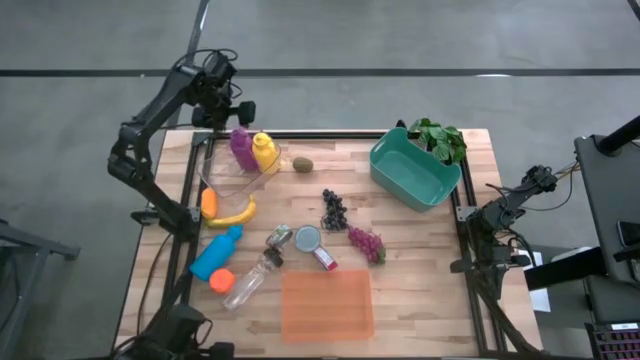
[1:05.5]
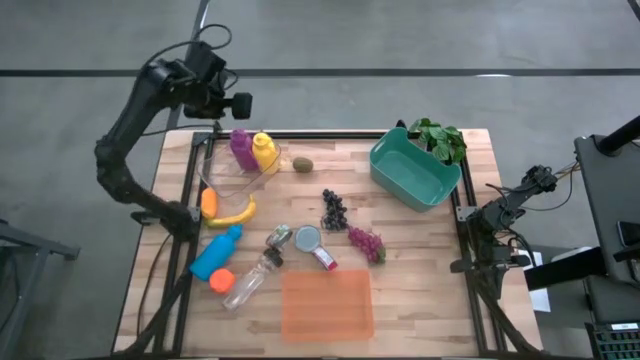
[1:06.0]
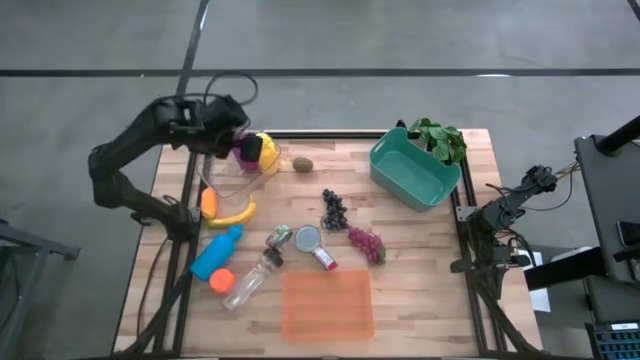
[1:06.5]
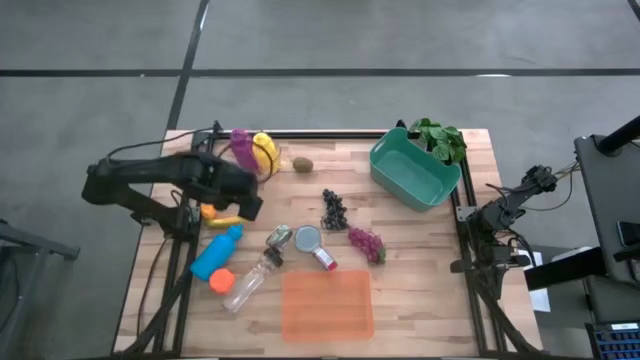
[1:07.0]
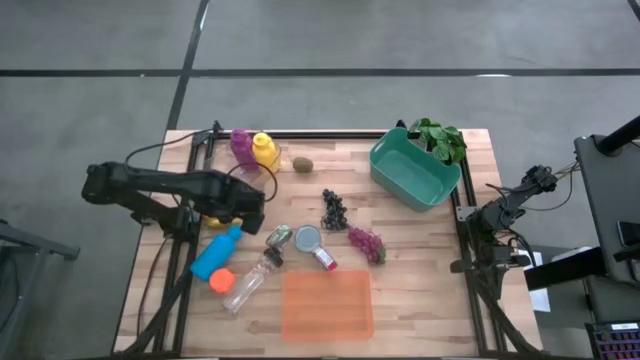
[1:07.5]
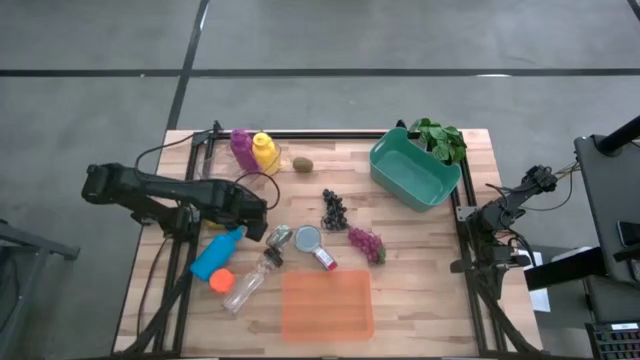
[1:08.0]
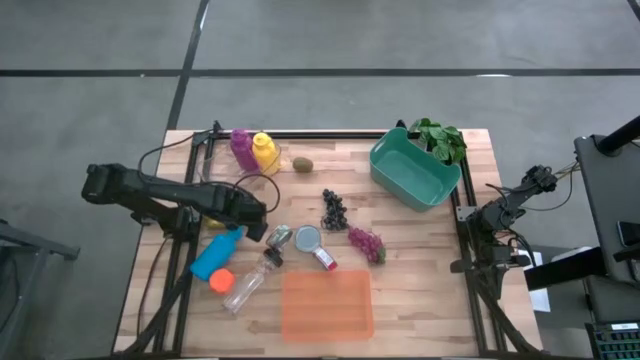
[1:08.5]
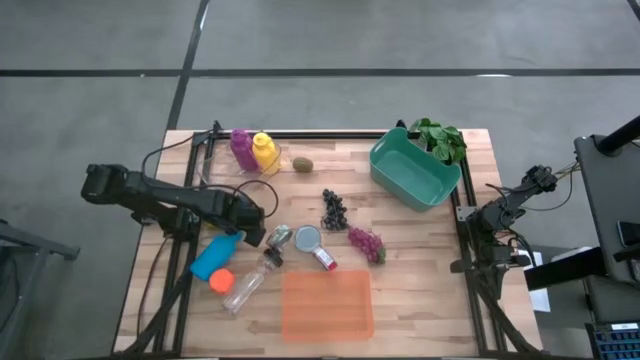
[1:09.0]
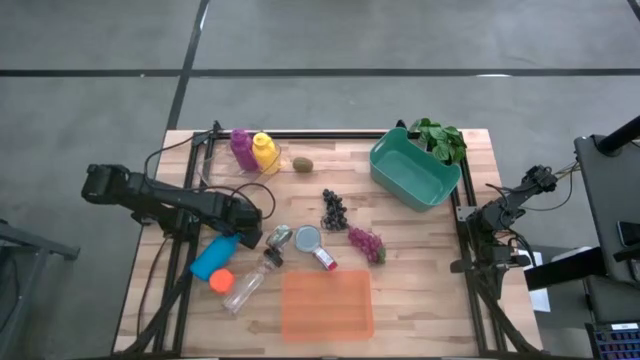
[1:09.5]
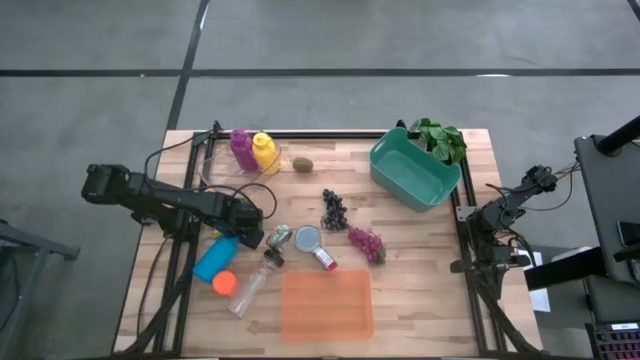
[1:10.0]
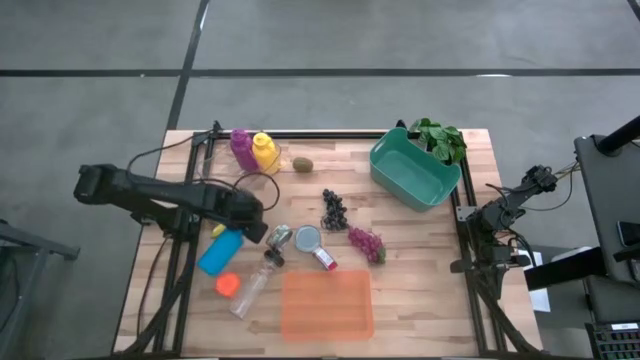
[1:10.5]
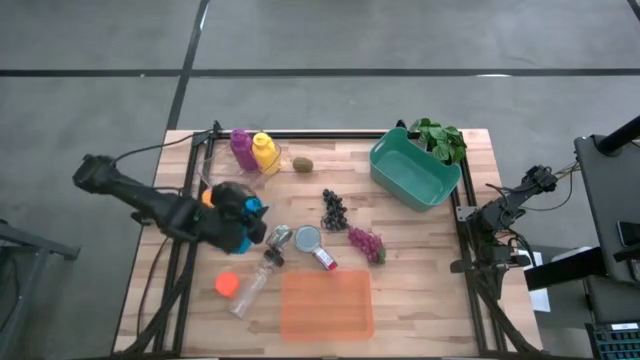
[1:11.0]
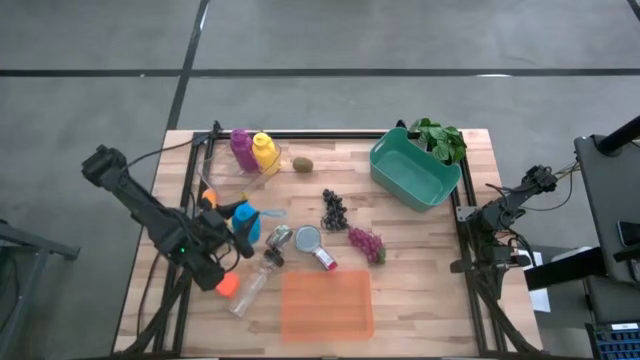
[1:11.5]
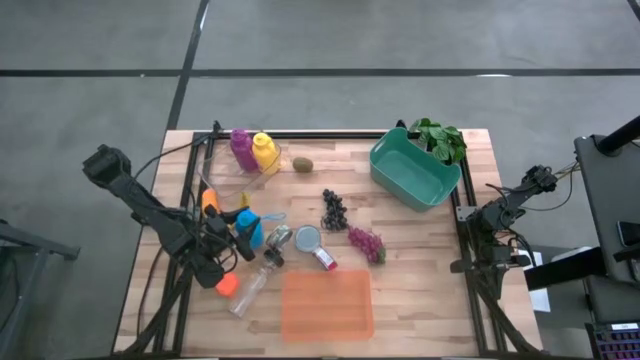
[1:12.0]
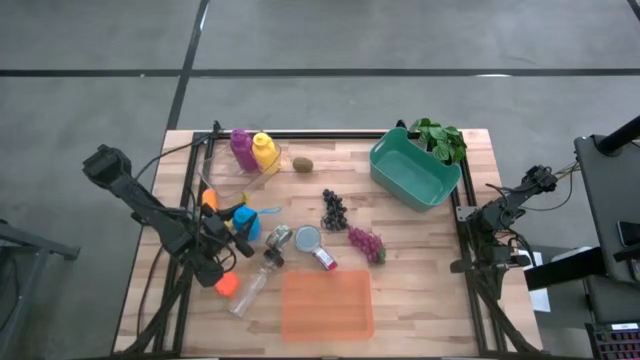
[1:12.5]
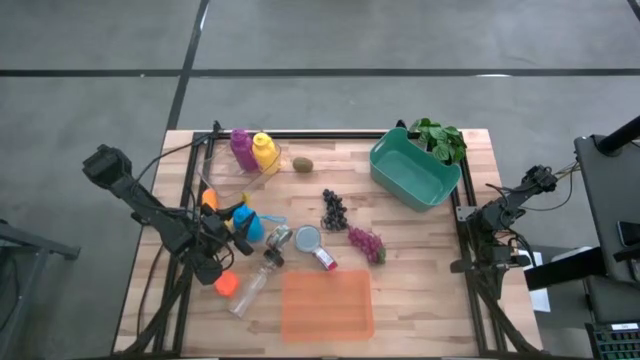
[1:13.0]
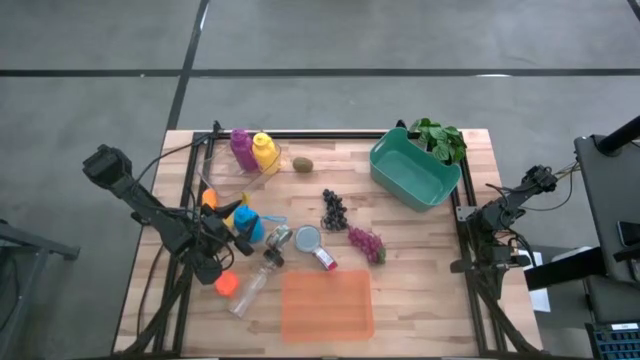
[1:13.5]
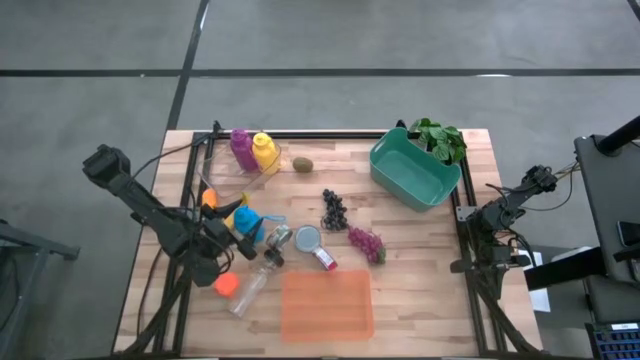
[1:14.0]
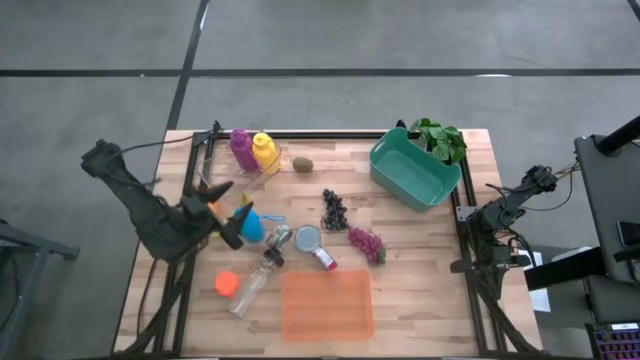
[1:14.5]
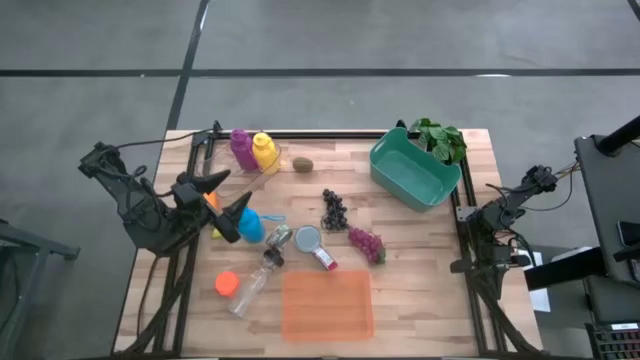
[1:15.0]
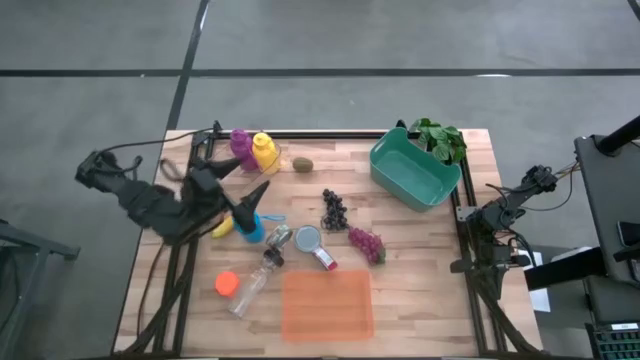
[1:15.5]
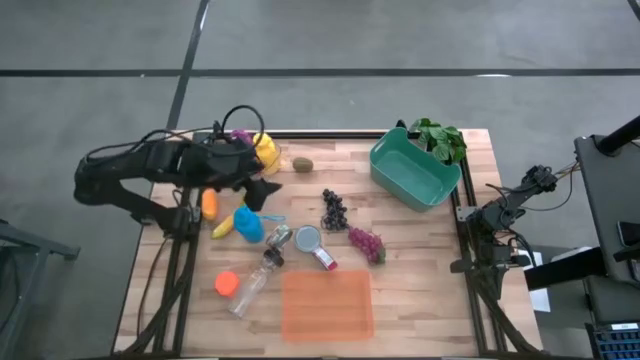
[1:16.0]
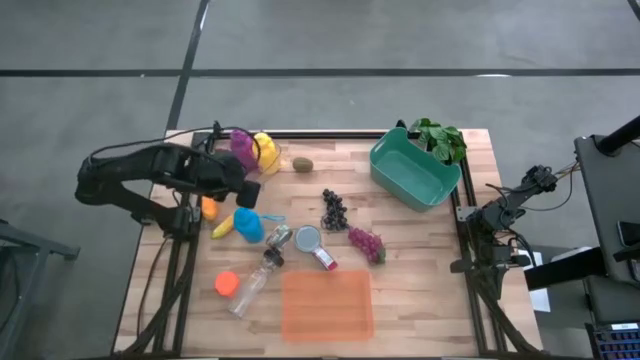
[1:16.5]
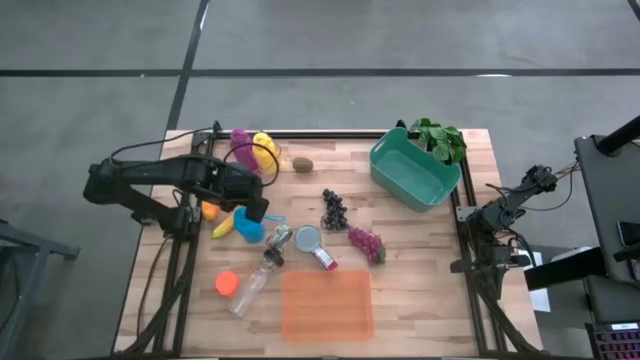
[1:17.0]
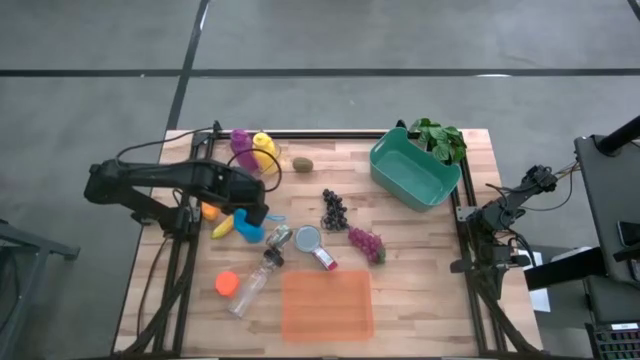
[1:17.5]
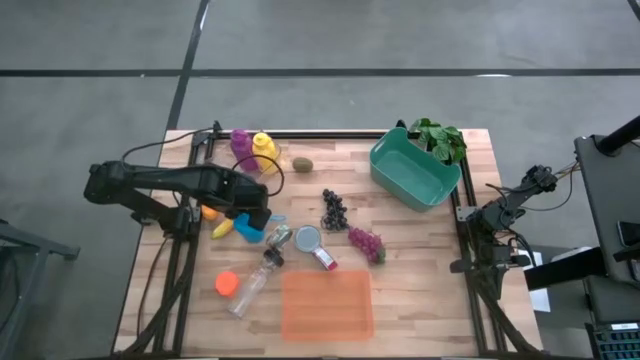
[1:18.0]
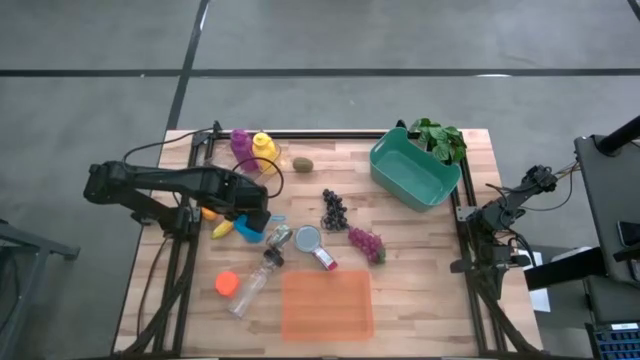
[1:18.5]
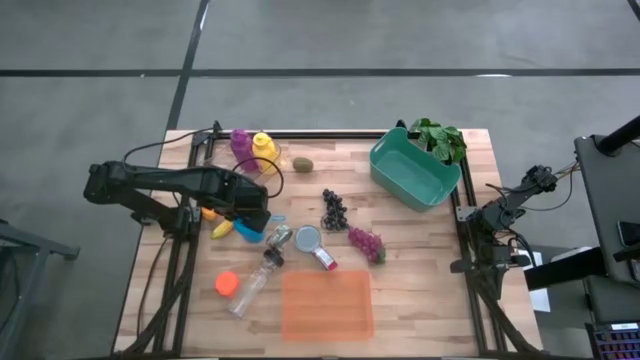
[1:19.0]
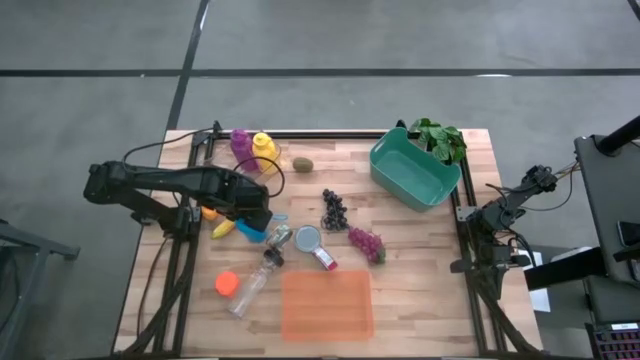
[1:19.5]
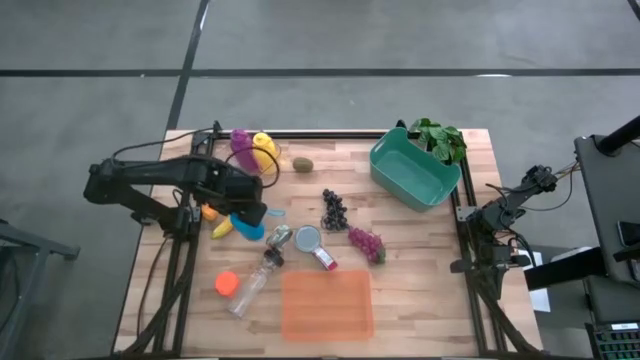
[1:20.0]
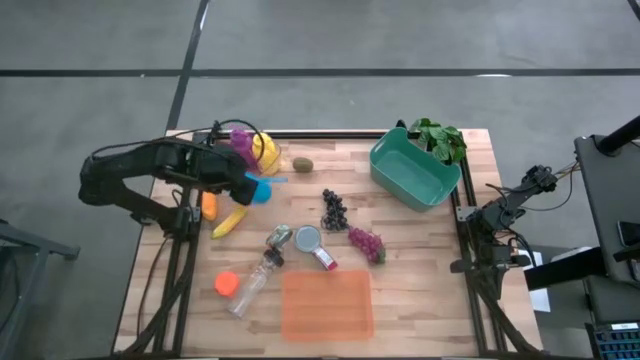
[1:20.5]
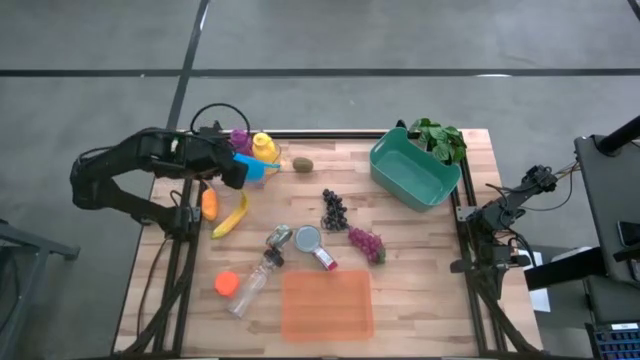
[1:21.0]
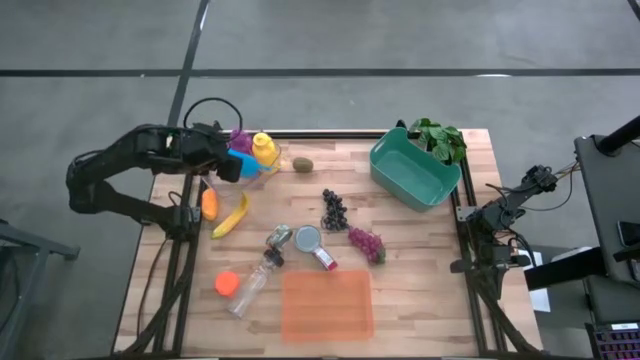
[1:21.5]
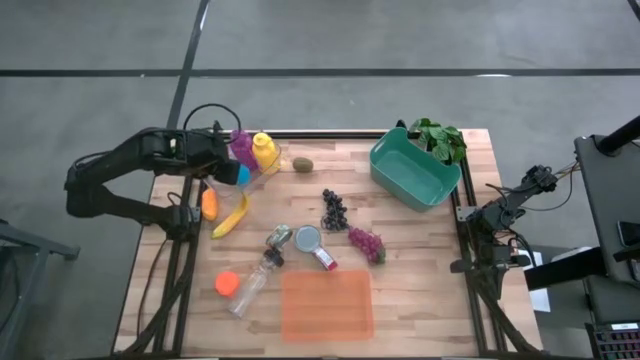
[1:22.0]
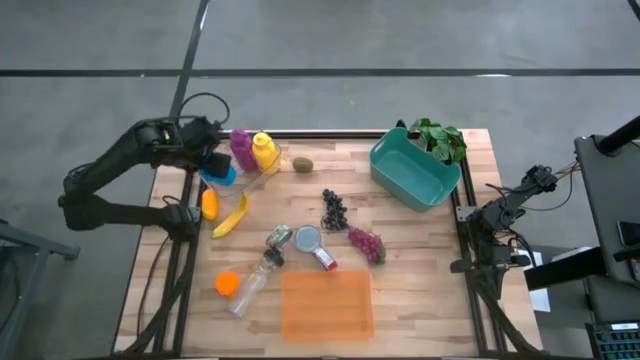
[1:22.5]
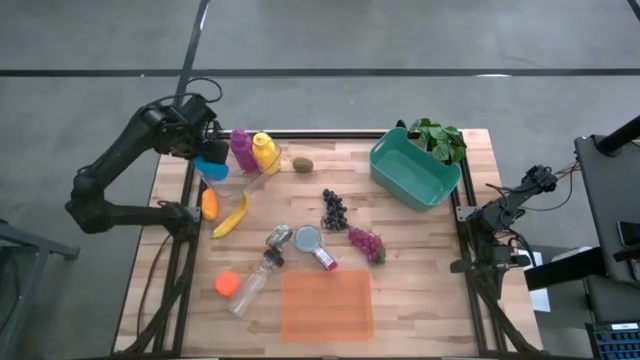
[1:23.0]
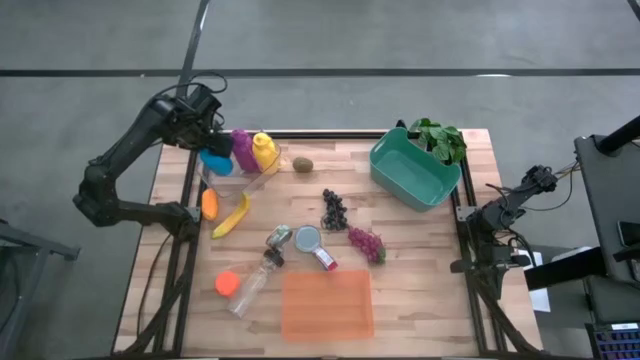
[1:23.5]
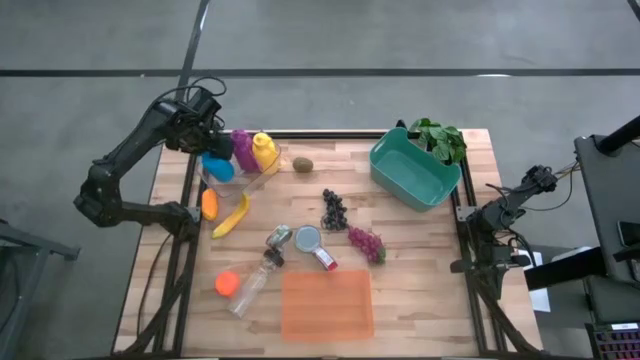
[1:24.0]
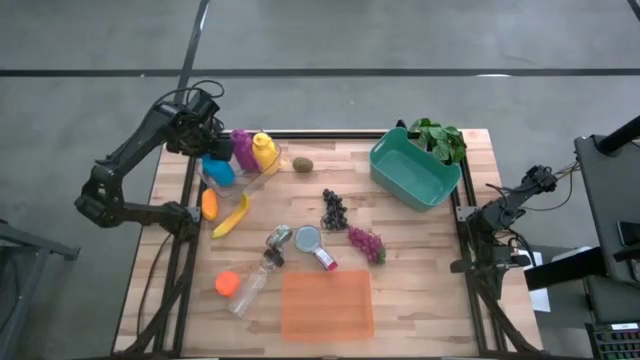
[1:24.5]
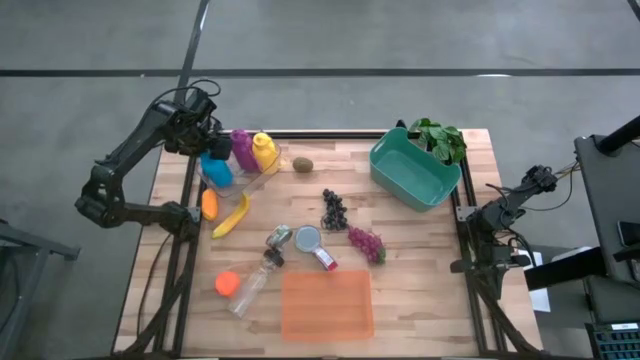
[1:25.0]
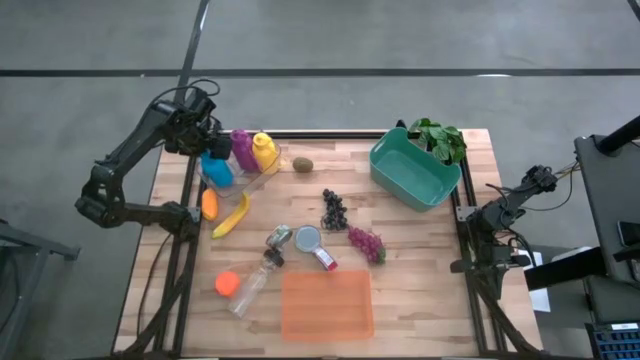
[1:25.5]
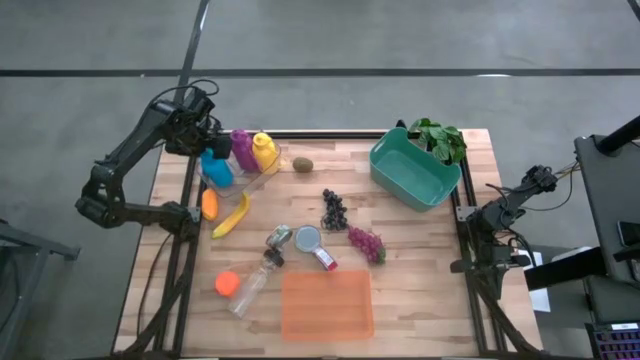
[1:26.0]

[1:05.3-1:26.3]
Task: Pick & Place Food Item
Put the blue water bottle into the transparent bin
